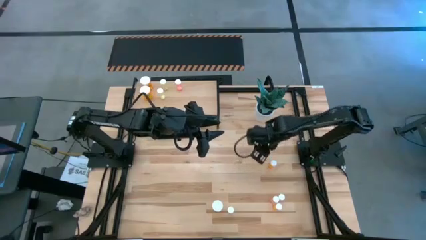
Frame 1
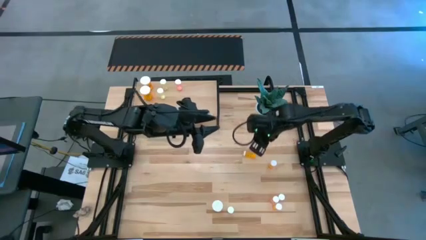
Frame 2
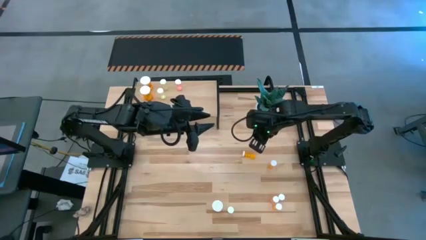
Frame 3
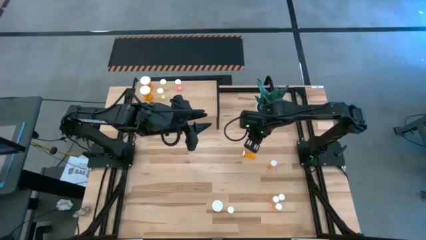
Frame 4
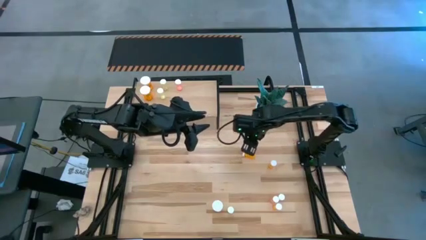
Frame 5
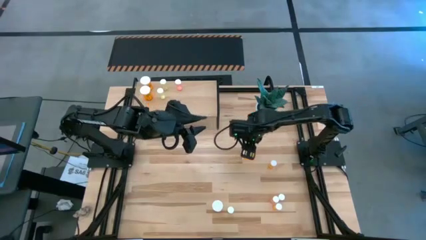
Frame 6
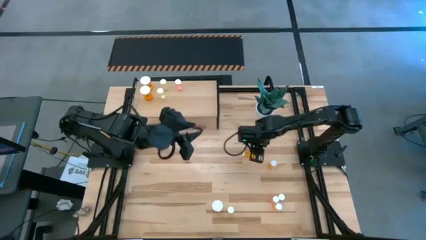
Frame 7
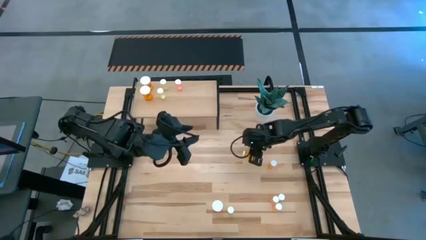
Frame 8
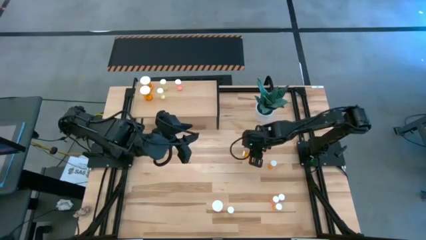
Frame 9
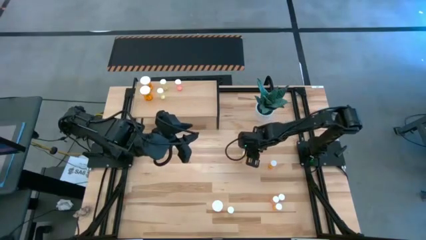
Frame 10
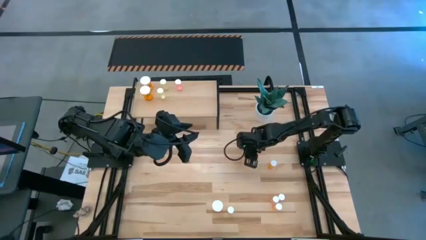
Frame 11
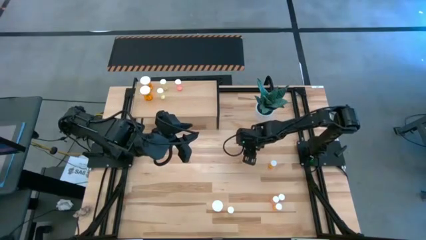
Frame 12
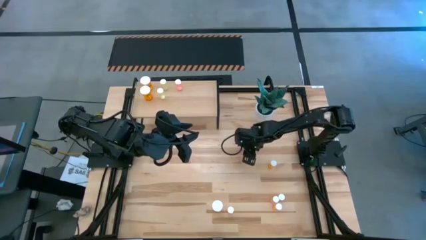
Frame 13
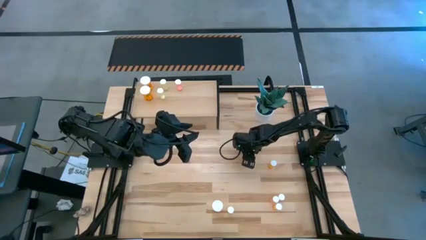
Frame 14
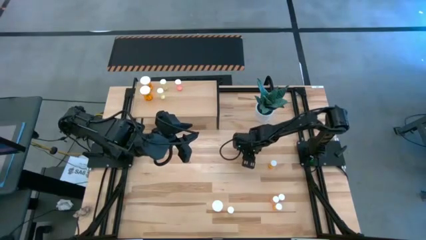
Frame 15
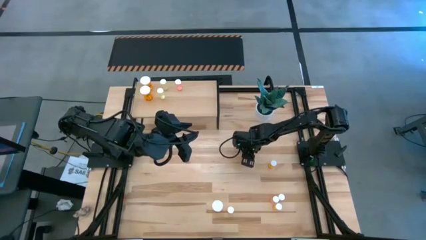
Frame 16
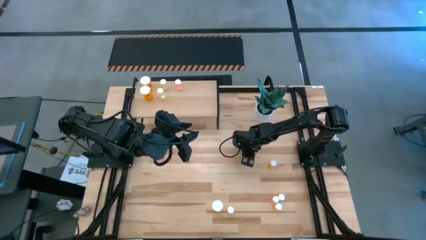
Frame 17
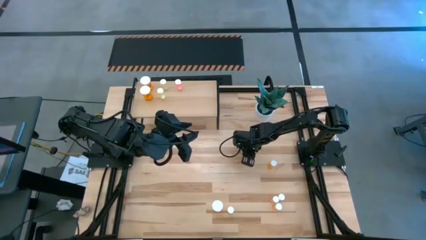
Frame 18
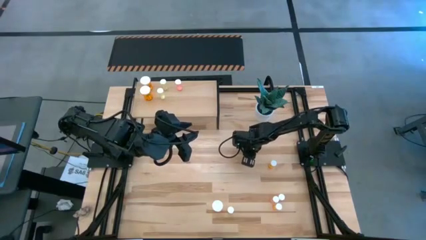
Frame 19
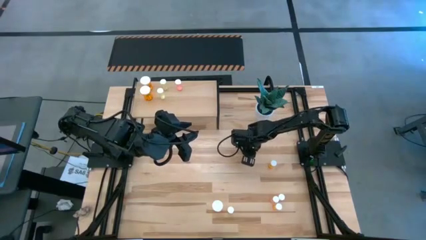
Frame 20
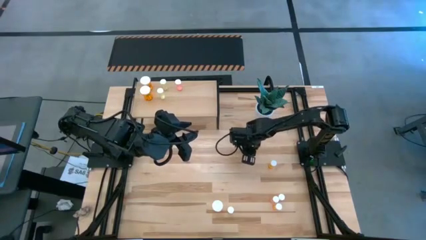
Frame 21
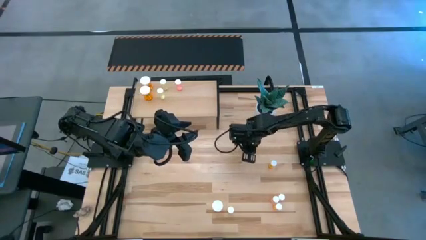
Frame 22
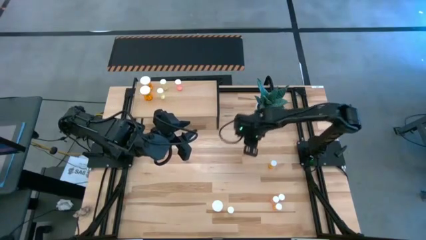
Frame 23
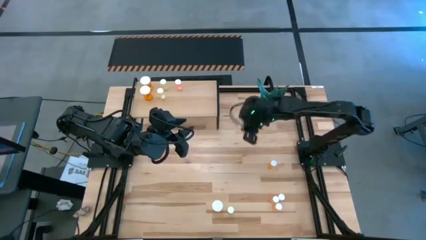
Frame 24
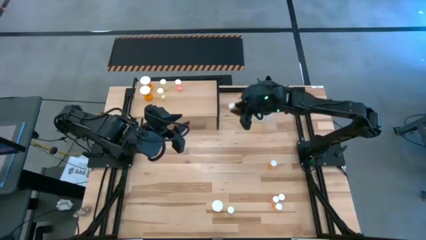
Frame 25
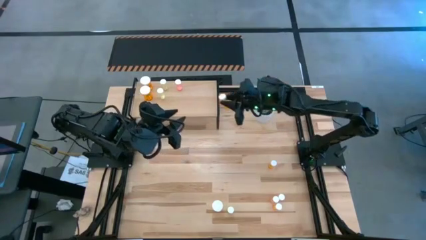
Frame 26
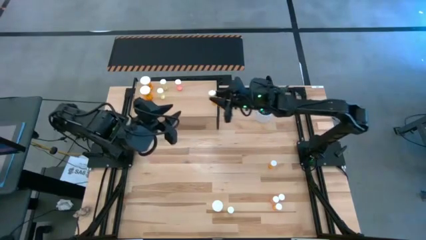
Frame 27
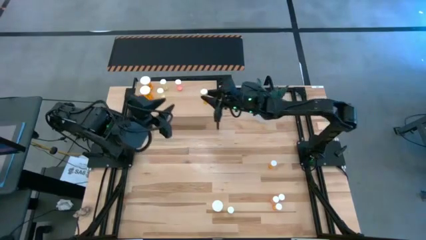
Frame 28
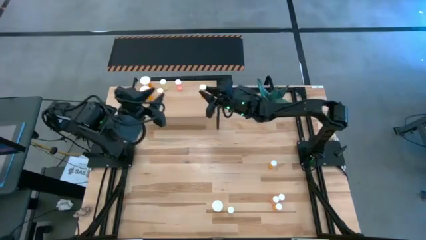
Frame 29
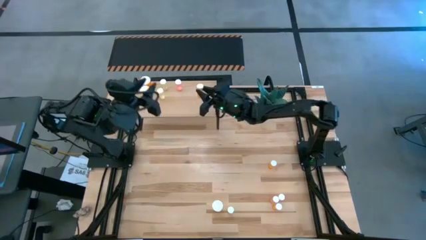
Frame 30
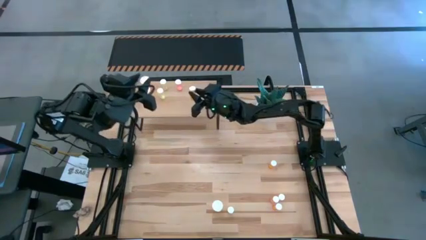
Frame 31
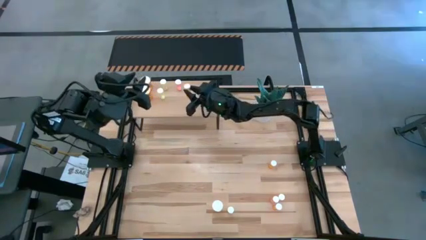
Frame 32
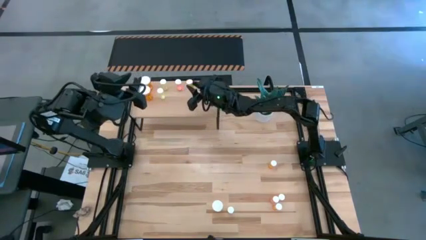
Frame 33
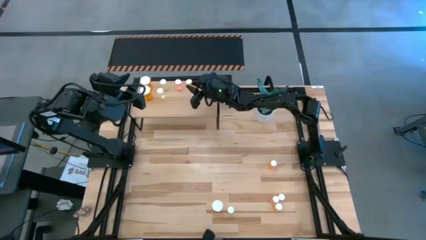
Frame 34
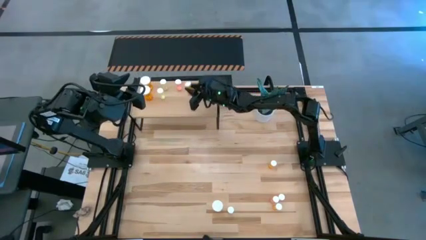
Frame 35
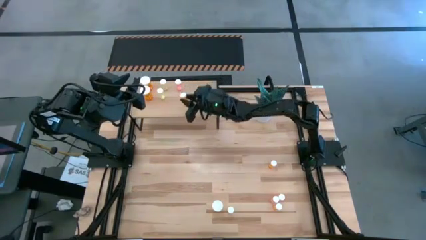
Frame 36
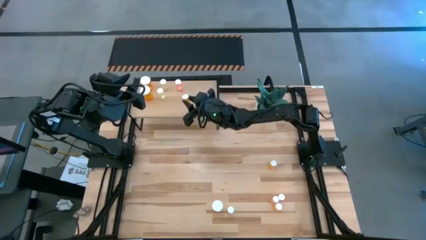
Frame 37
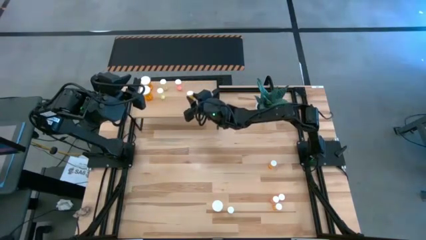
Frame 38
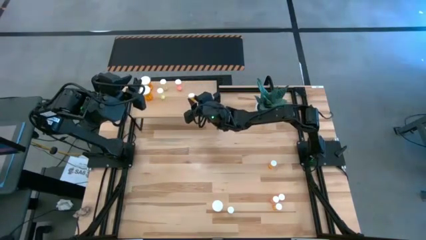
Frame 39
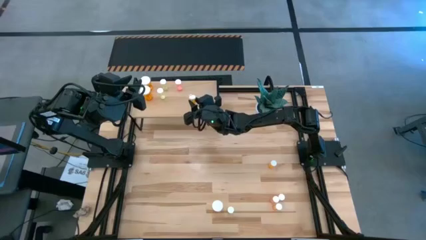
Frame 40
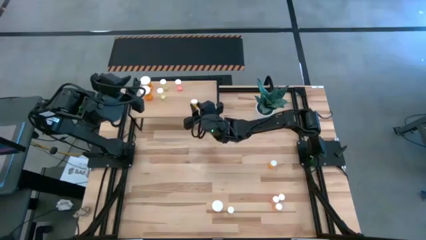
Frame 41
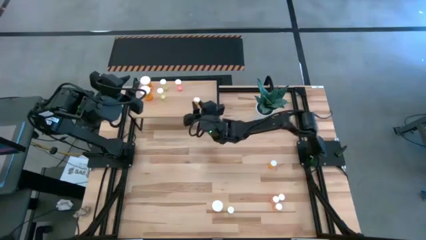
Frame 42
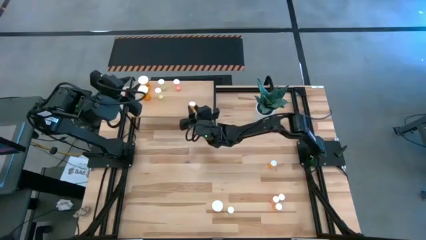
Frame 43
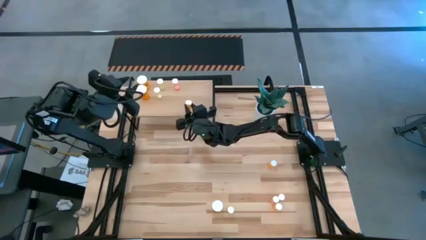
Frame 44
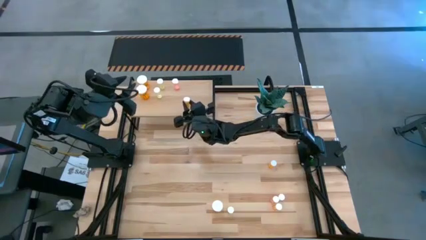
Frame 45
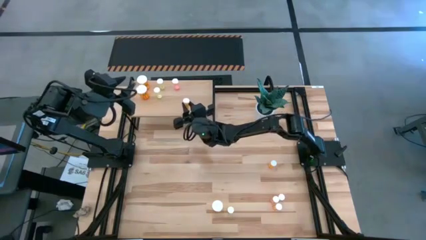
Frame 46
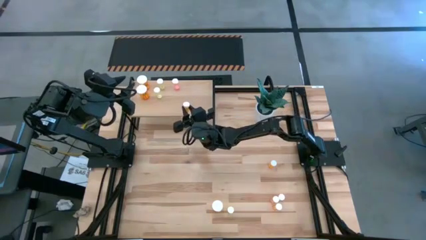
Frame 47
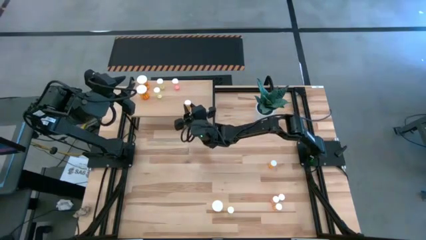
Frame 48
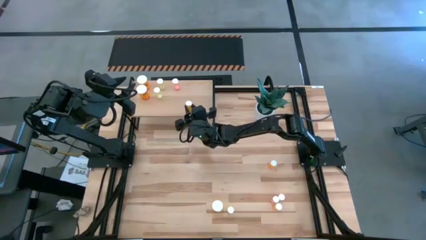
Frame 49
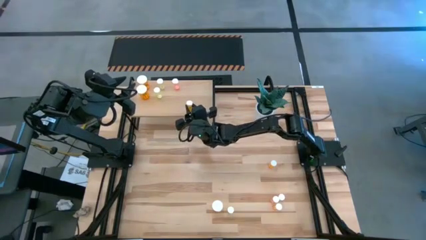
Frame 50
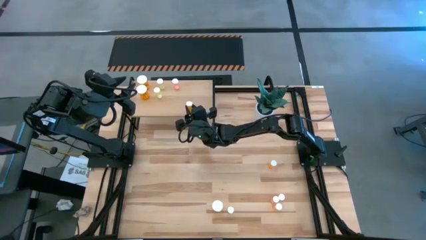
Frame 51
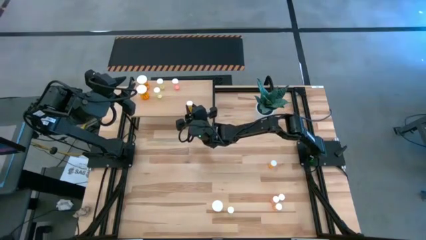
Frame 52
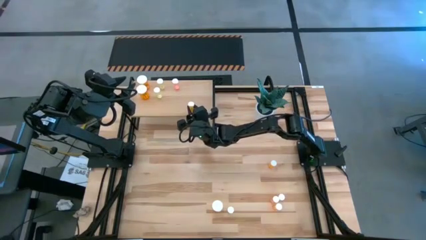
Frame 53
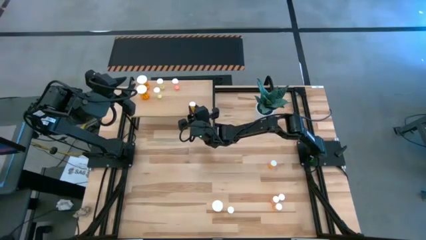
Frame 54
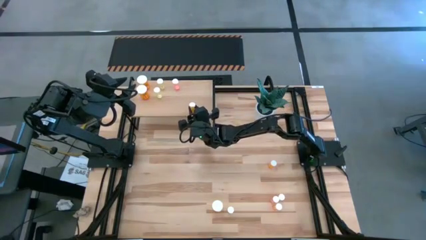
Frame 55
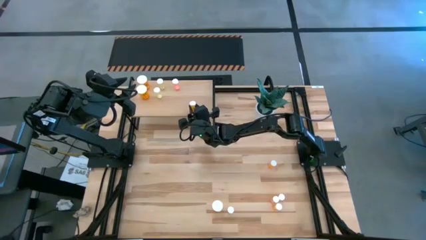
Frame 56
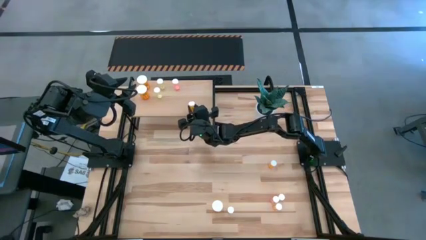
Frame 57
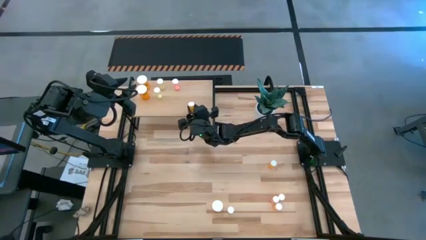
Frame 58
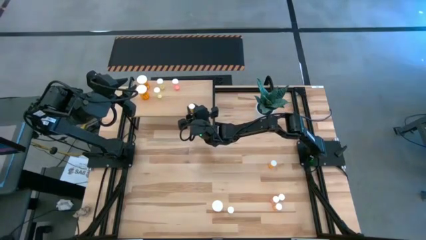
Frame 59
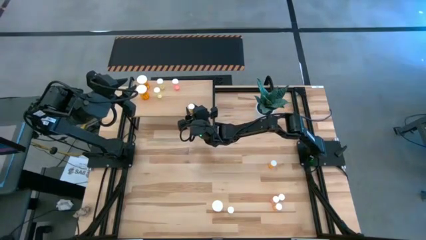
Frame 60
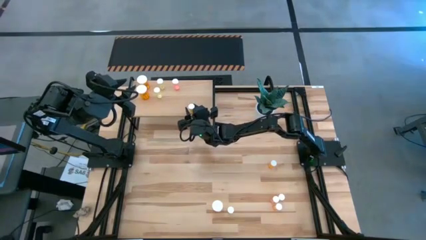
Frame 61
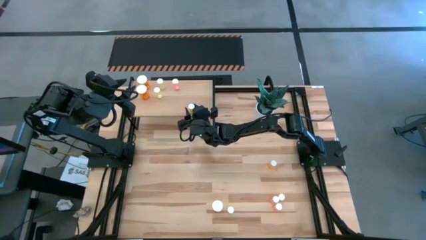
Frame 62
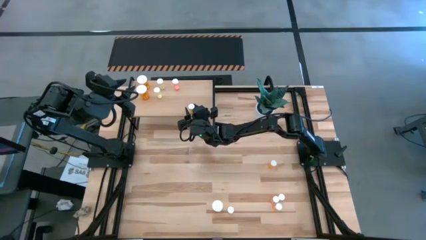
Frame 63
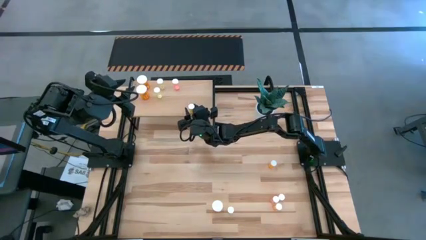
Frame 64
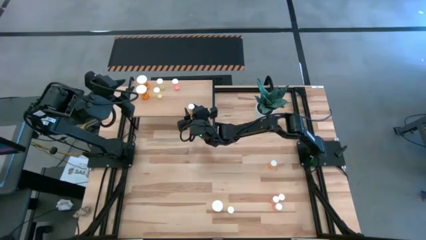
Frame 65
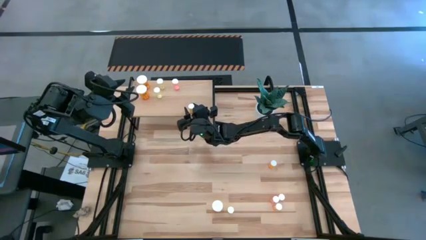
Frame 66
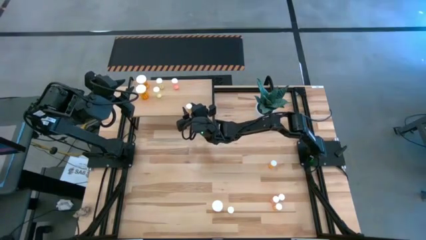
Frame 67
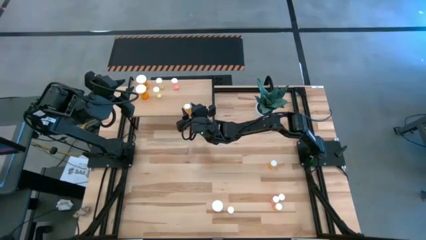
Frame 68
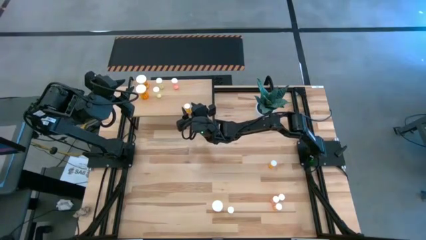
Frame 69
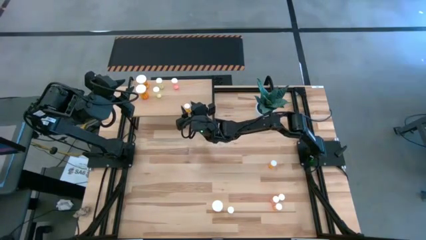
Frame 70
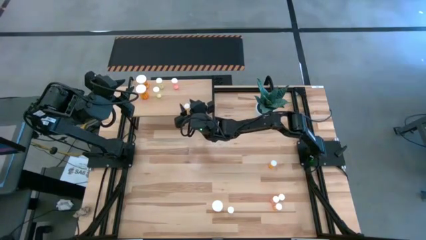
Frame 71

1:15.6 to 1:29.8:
Task: Pick and place medicine bottles onto shelf by color
Put the top small orange pill bottle on the shelf
